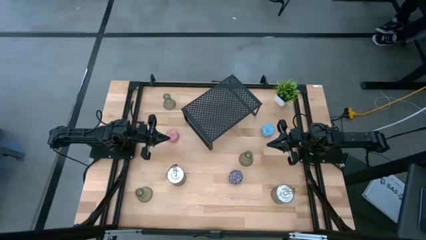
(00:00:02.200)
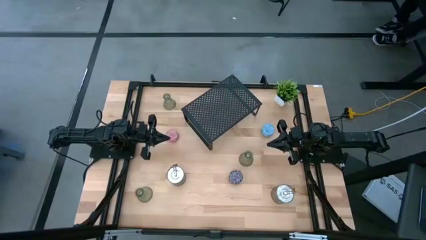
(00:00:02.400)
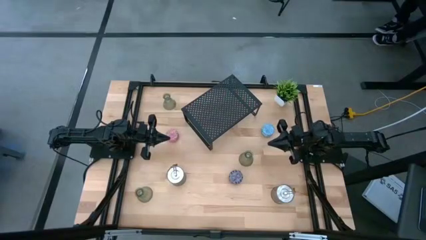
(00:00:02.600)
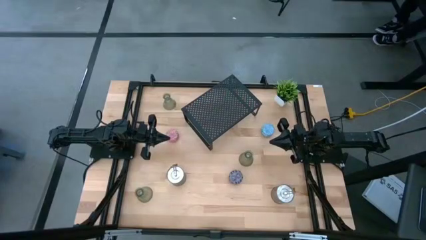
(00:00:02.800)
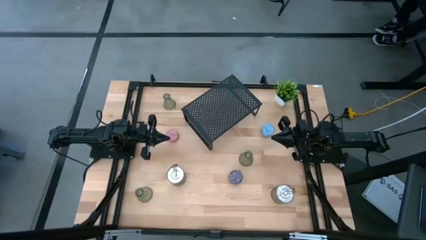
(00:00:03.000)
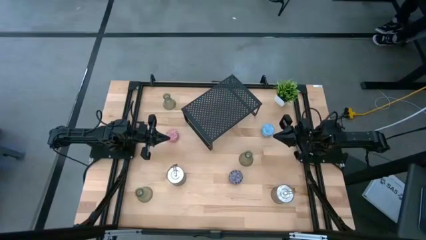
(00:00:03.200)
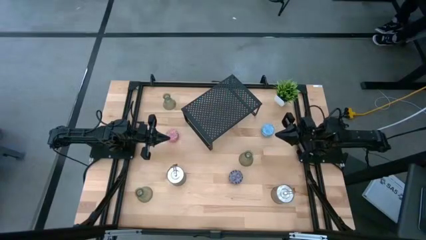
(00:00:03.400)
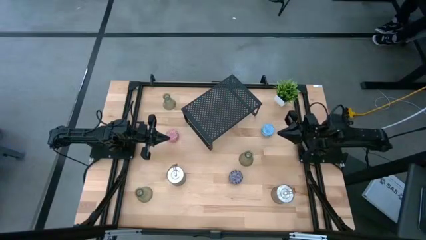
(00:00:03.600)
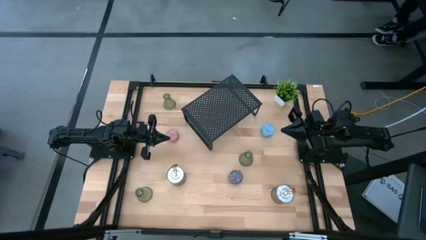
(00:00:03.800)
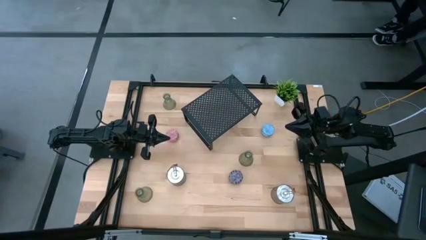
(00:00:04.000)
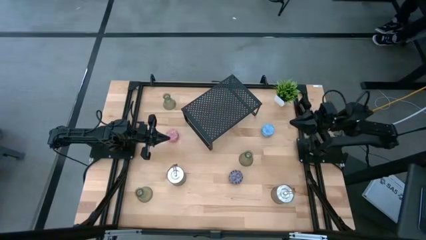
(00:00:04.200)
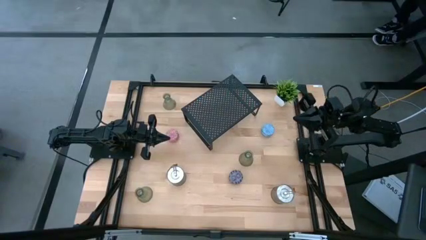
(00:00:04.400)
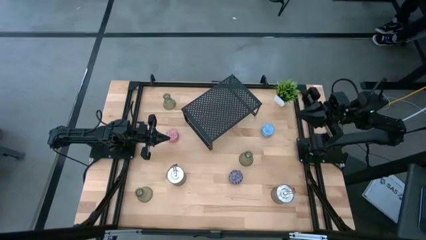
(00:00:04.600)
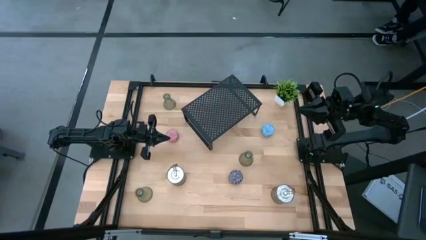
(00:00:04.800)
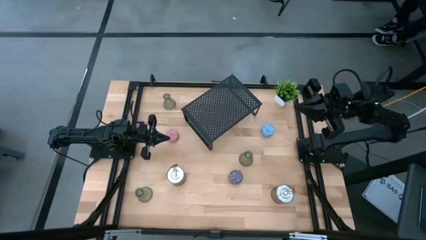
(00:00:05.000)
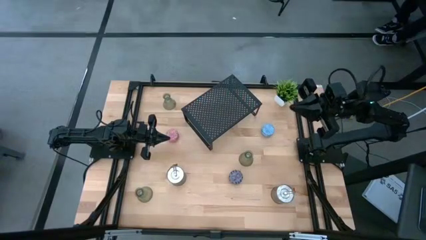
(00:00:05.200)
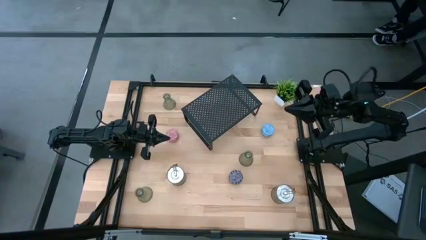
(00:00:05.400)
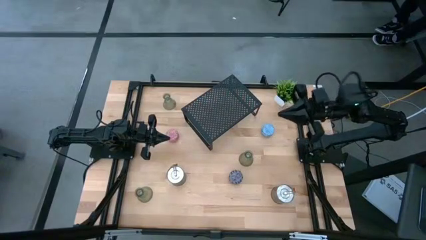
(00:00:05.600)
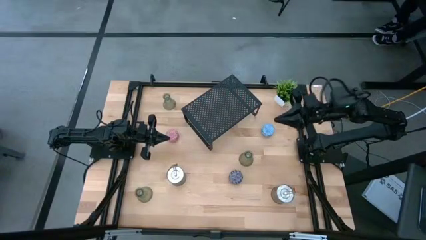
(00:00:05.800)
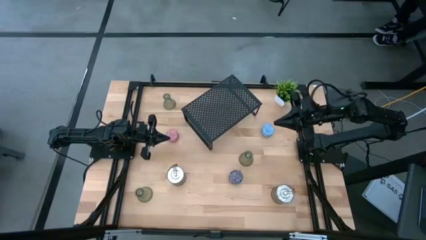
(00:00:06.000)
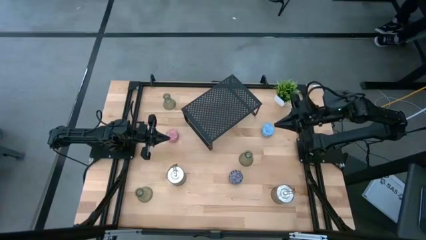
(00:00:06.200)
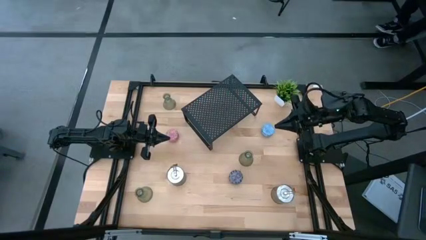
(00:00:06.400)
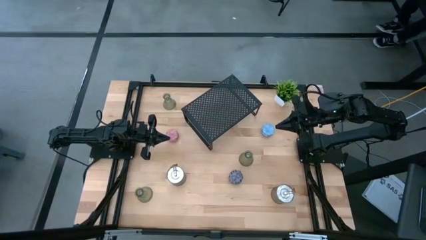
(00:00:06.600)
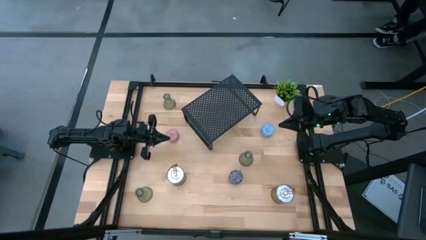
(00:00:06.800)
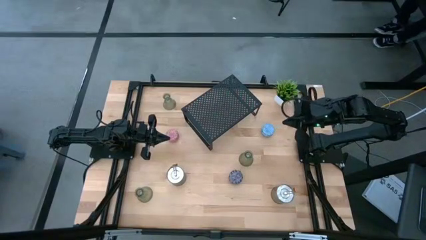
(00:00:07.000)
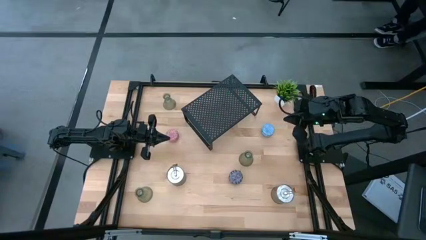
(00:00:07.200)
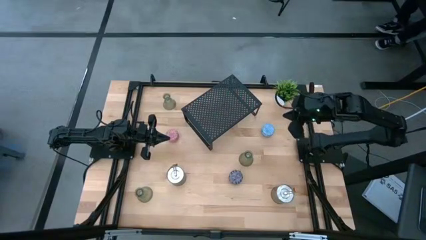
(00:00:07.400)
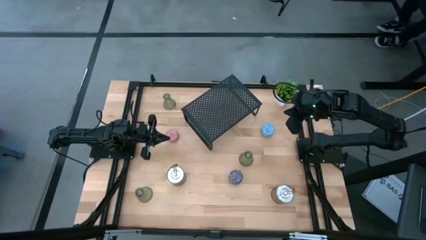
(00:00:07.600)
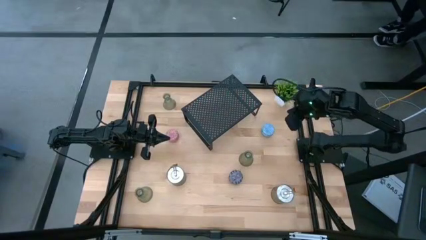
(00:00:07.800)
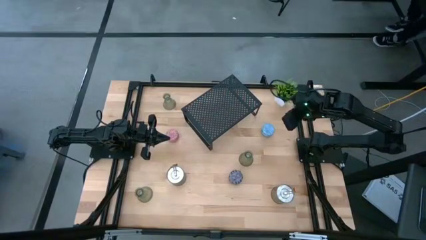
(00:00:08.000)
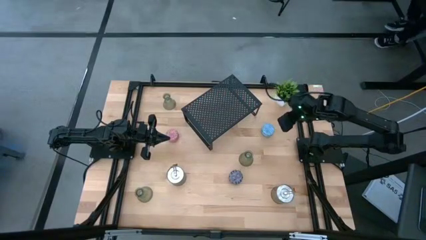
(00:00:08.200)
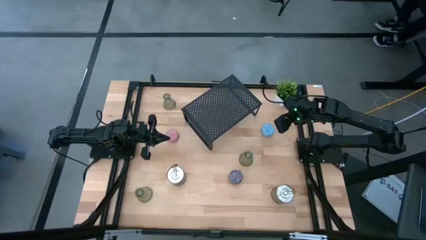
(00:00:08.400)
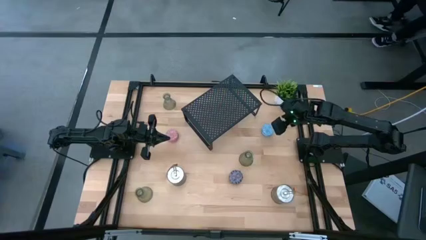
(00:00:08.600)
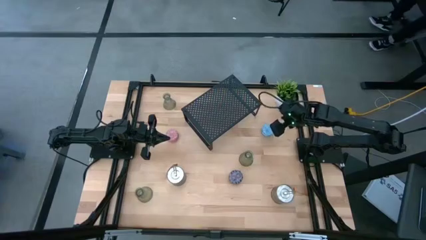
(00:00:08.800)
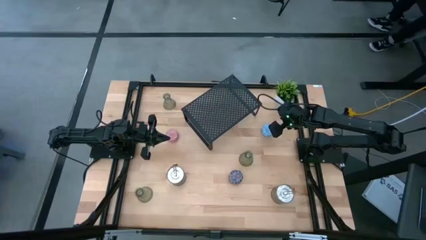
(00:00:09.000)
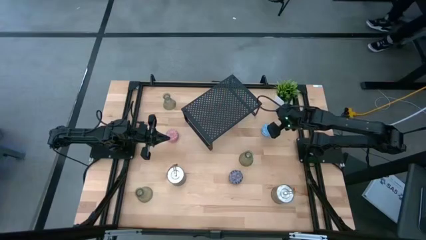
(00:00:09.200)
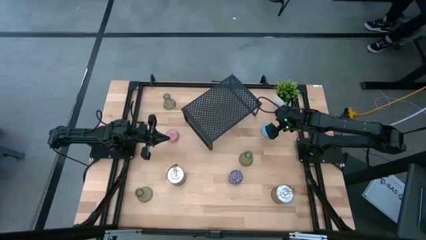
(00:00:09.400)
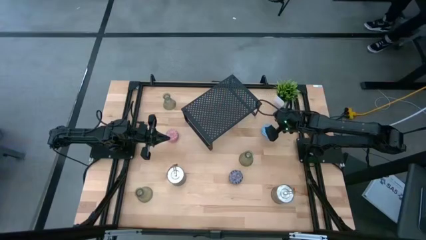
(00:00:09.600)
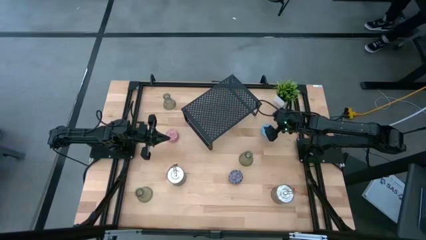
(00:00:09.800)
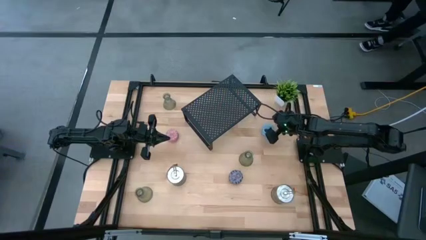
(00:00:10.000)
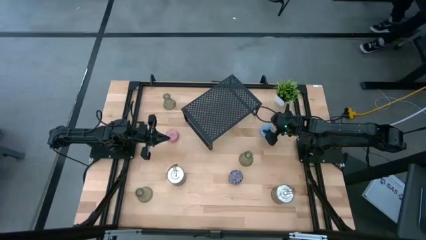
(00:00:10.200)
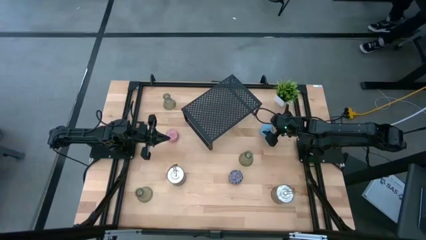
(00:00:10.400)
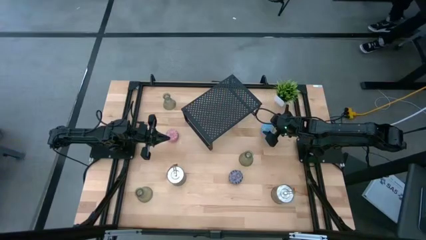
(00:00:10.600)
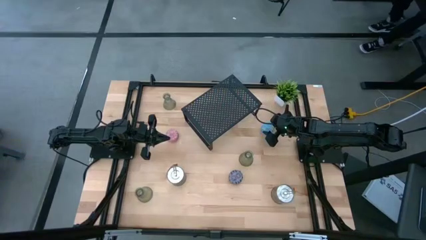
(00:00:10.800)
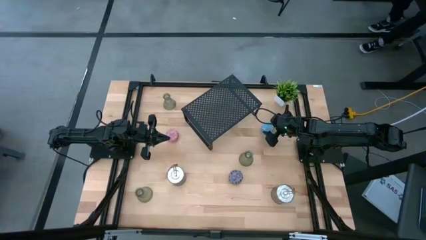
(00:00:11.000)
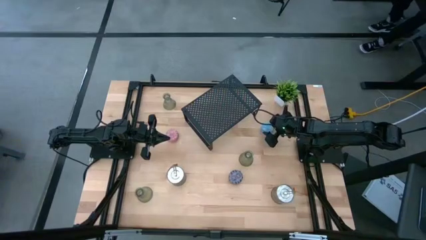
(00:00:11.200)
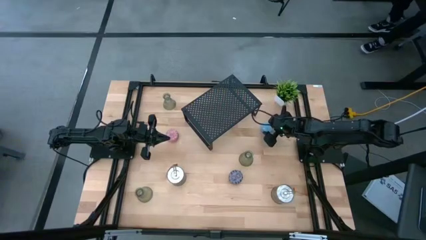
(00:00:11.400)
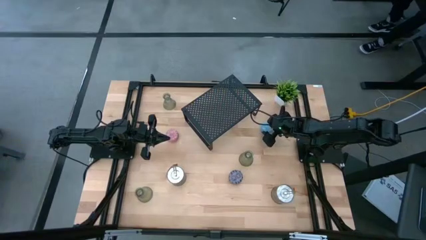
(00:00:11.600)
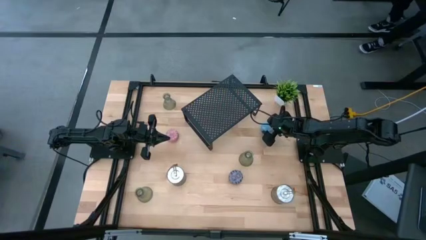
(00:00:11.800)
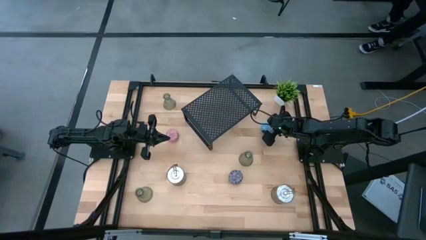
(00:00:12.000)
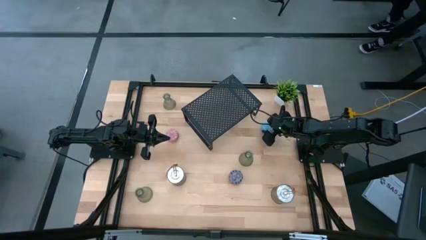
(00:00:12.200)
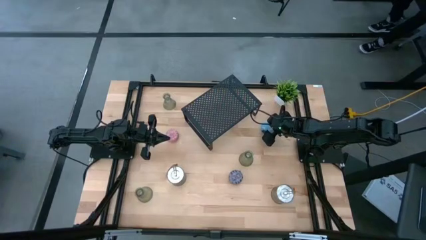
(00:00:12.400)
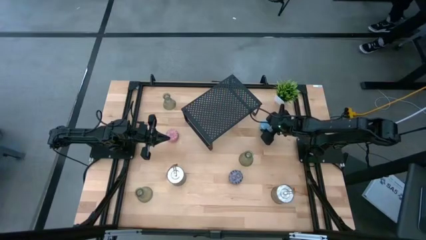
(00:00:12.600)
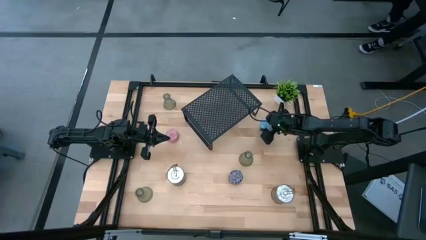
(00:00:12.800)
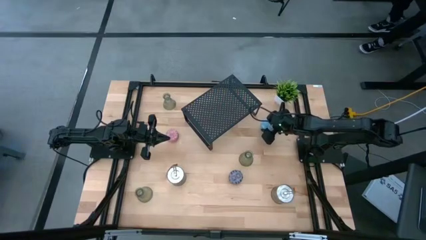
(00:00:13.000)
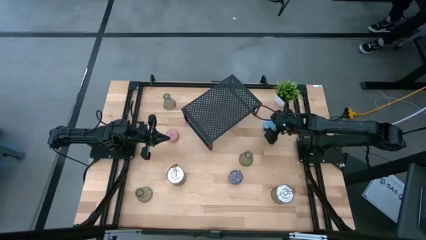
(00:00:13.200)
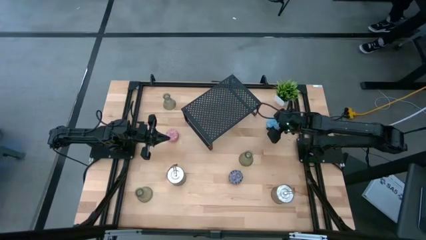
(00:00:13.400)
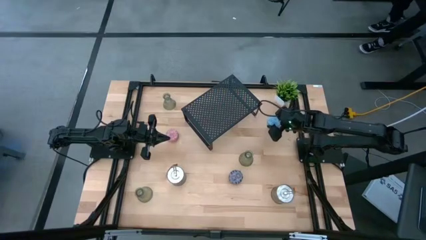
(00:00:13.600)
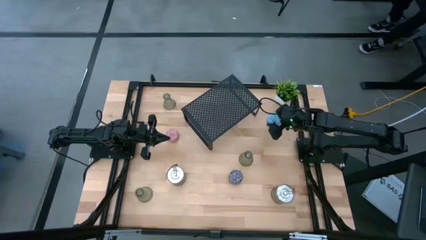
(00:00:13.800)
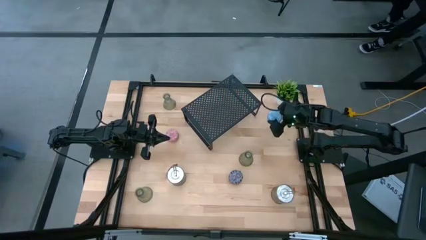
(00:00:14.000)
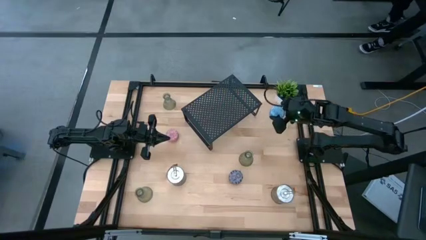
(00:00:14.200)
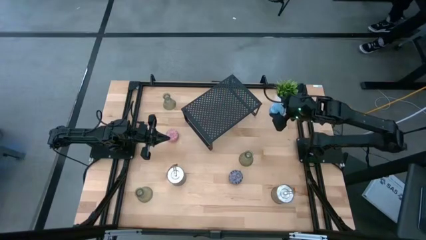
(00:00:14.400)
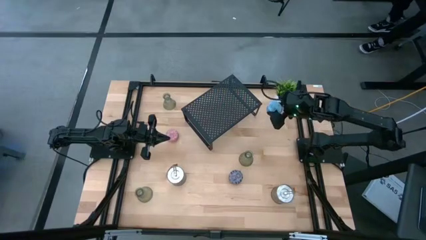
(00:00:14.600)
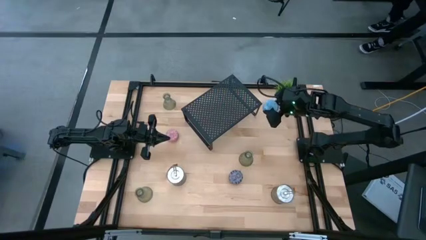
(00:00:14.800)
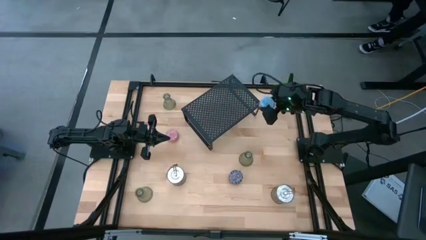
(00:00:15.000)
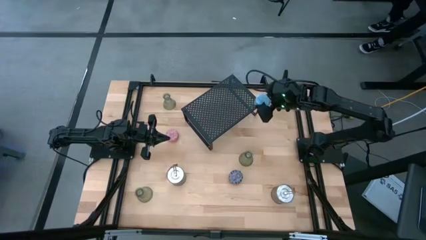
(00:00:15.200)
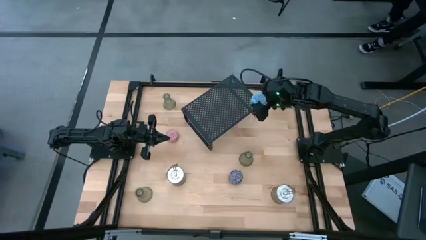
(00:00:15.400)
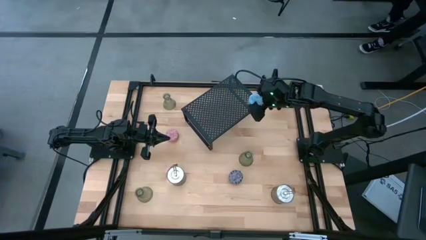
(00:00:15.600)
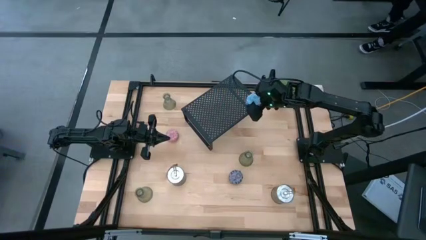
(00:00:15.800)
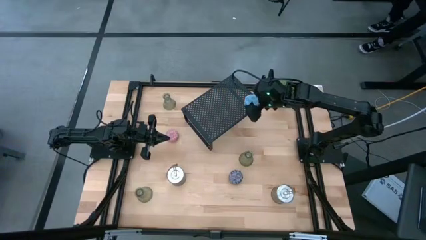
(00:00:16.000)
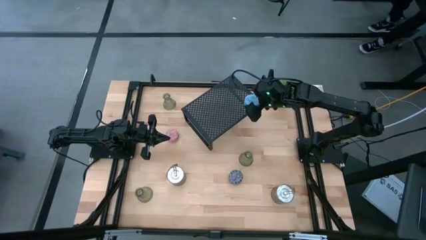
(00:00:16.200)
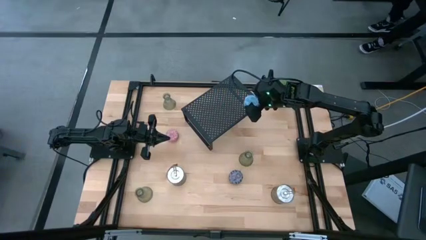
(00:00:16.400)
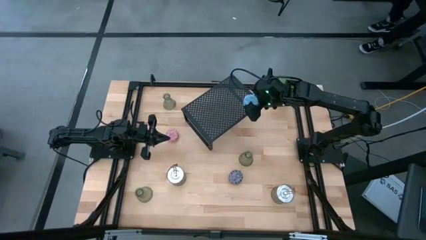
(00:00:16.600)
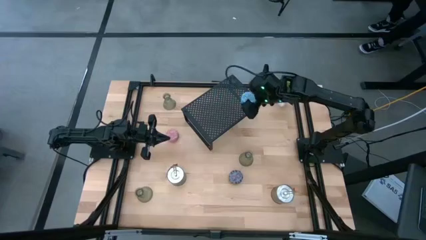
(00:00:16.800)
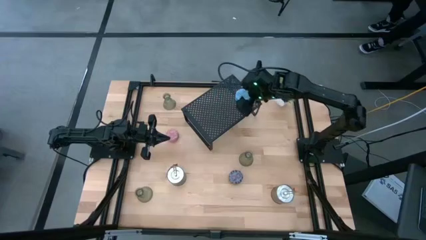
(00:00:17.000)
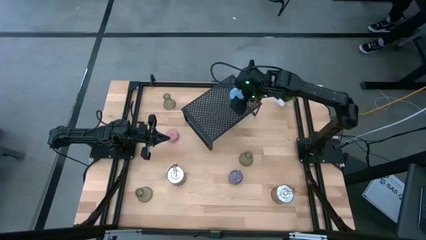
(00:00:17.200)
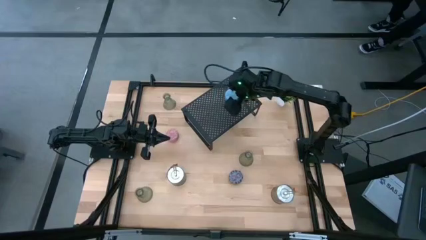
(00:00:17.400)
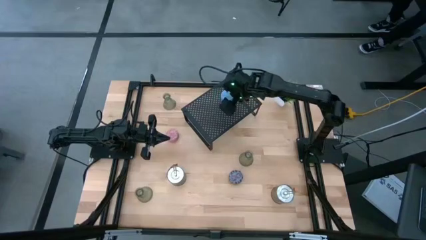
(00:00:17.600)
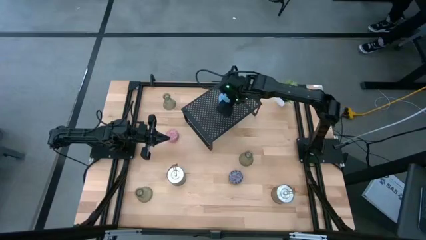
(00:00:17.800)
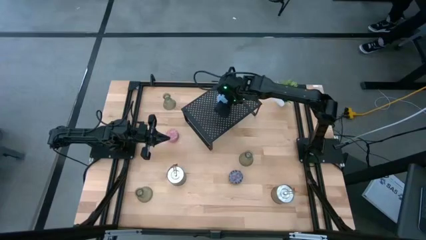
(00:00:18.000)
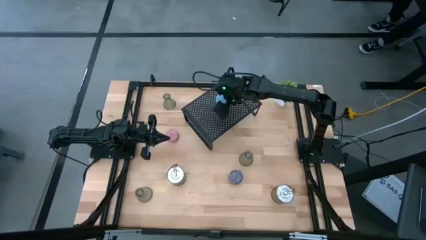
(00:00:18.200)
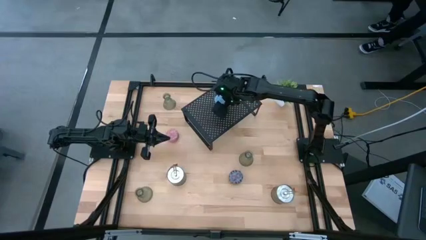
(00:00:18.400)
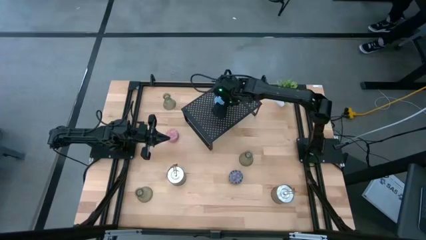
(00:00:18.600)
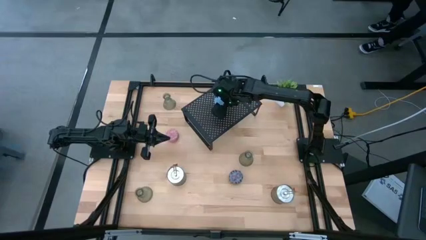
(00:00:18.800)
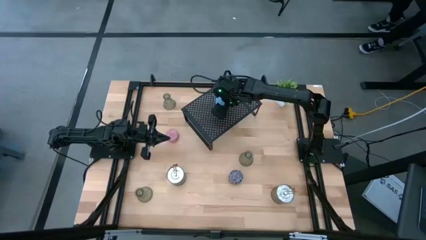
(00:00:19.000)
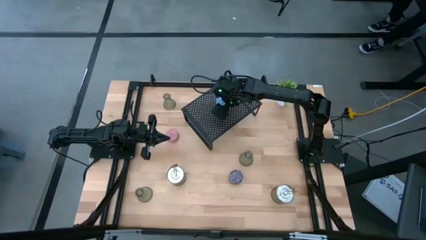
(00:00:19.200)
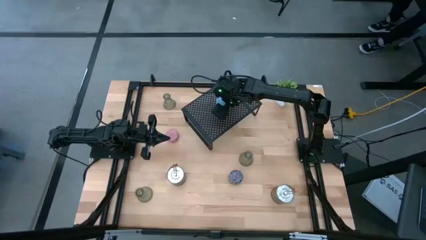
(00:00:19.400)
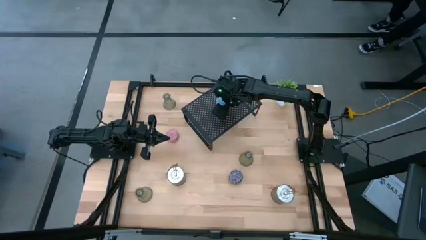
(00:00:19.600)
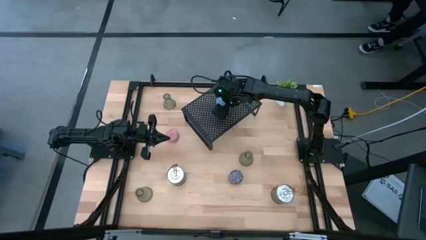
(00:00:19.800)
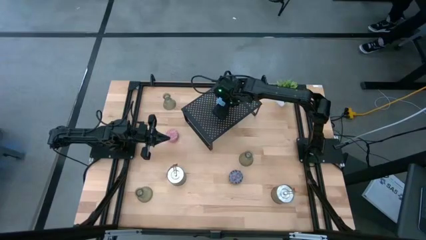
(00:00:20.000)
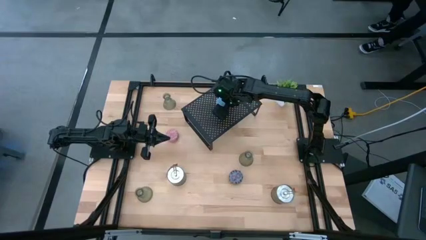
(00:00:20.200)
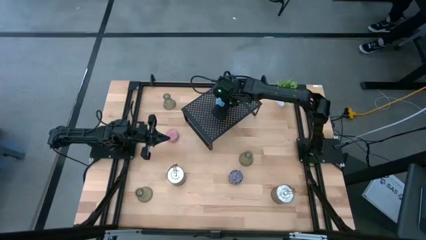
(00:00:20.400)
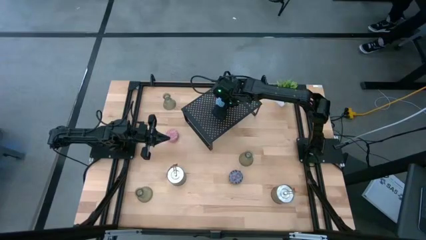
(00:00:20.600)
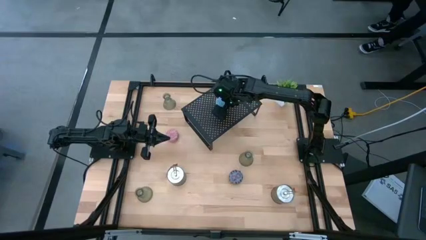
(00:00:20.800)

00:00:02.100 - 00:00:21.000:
Task: Pick & Place candle stick holders
Put the light blue small scented candle on the shelf
